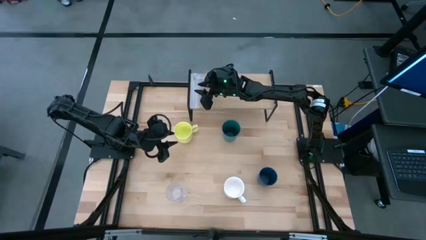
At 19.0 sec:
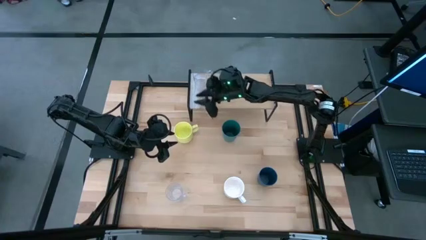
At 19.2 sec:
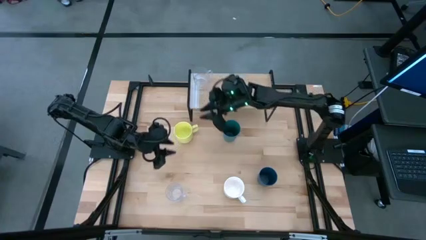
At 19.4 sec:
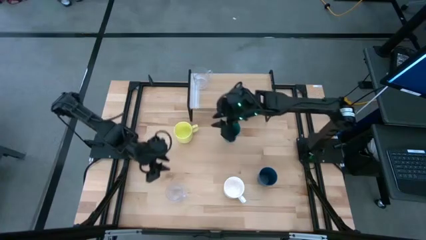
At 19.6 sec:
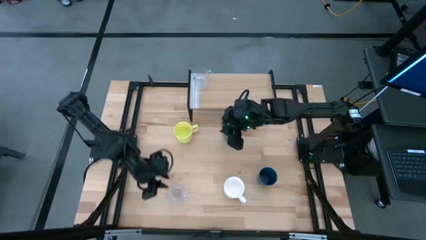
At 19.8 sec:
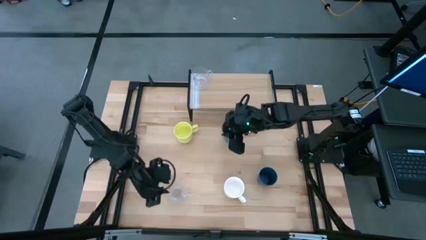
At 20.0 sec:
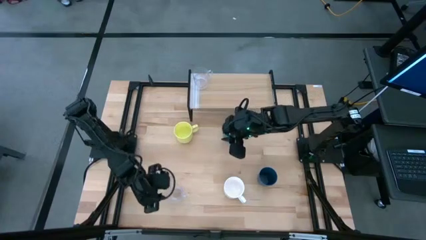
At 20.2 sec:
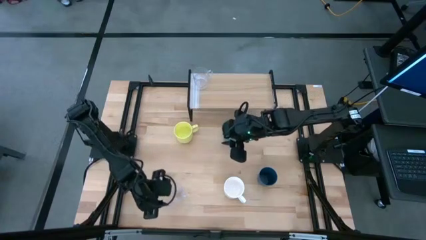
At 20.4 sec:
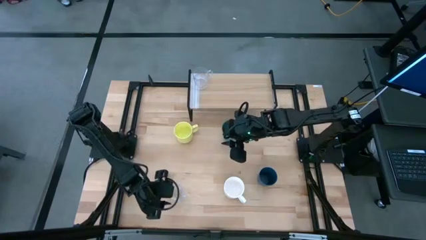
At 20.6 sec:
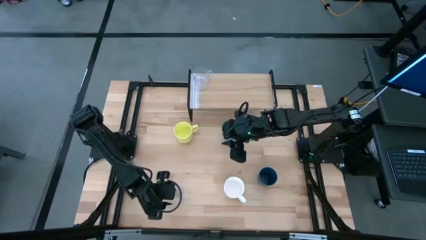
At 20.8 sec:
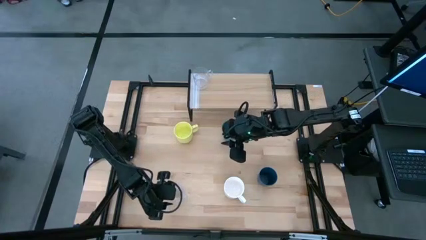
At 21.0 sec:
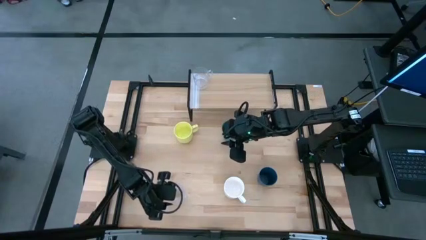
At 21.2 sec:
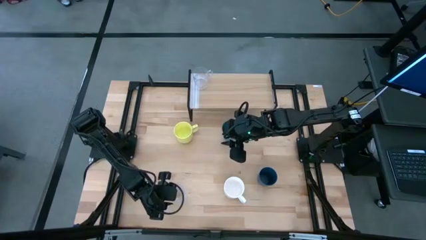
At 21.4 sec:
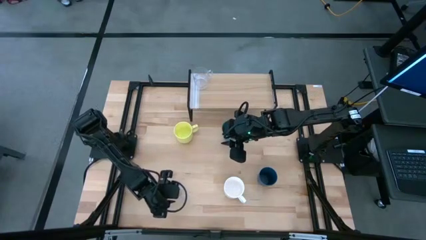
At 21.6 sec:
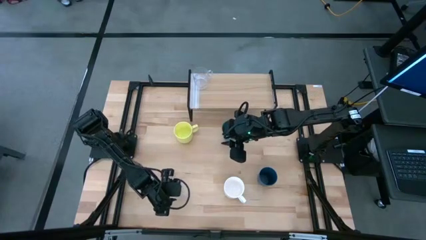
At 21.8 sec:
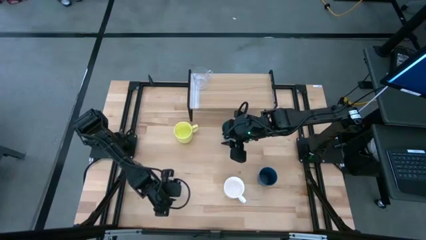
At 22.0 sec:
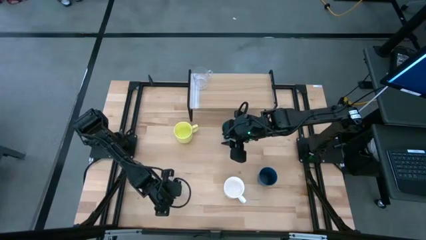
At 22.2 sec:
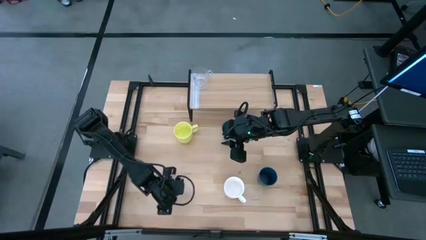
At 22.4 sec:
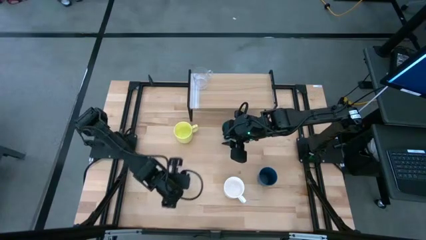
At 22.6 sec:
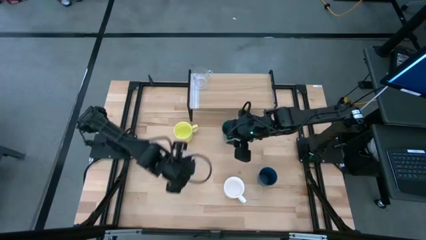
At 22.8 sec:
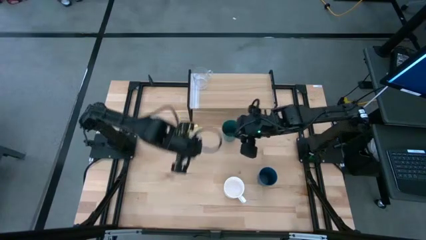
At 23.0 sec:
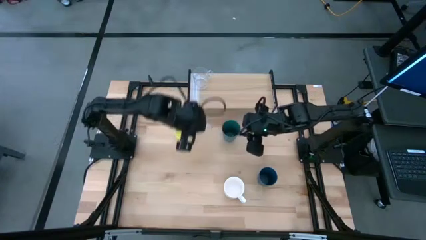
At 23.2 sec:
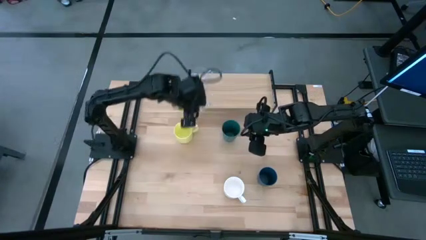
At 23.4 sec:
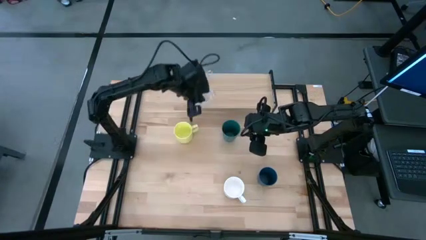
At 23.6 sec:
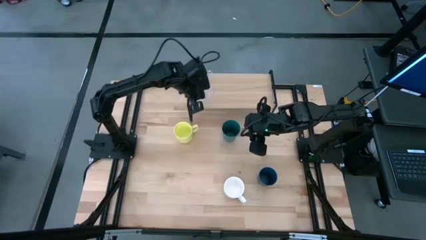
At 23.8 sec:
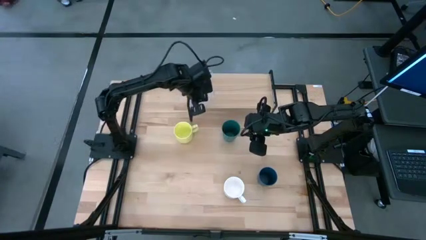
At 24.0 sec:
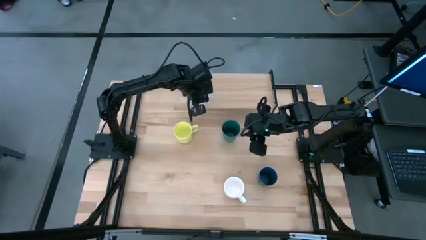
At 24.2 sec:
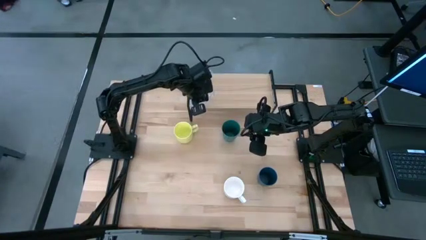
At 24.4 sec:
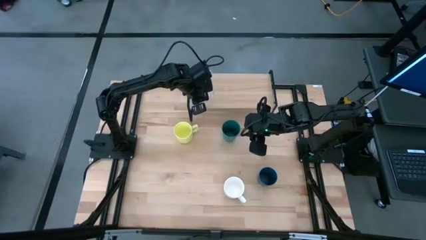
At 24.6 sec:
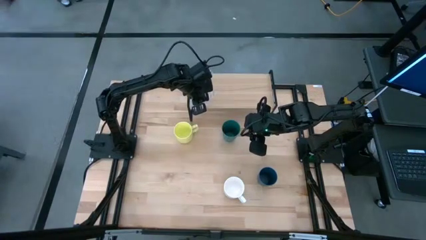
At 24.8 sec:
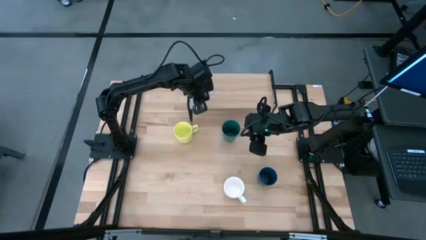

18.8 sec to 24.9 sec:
Task: Stack small to large cups/mugs on shelf
Put the transparent mug on the shelf aligned with the other transparent mug

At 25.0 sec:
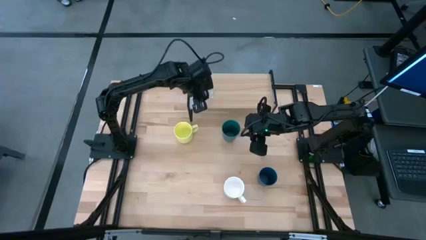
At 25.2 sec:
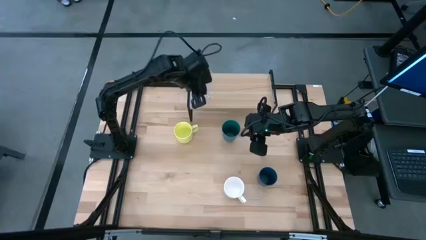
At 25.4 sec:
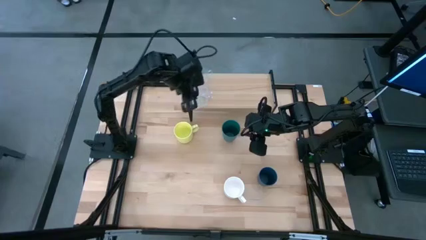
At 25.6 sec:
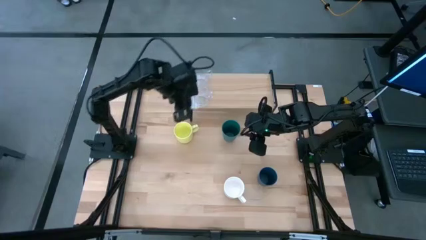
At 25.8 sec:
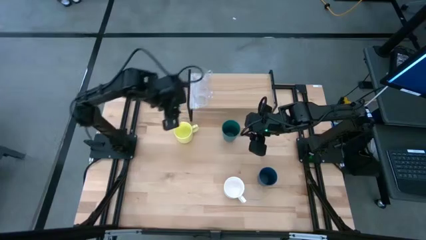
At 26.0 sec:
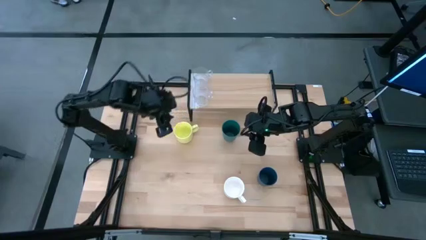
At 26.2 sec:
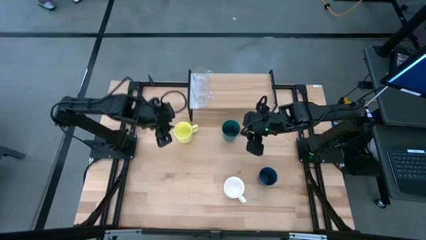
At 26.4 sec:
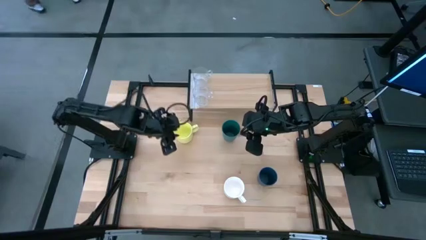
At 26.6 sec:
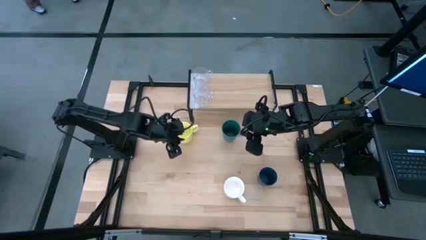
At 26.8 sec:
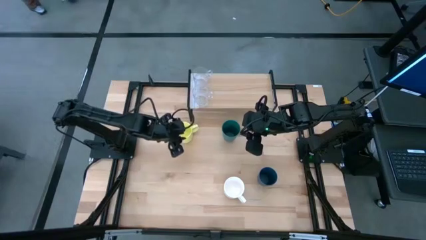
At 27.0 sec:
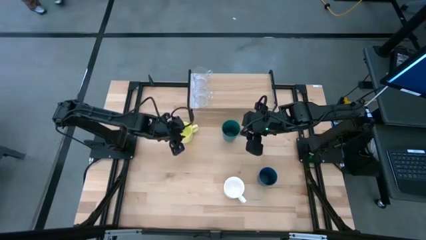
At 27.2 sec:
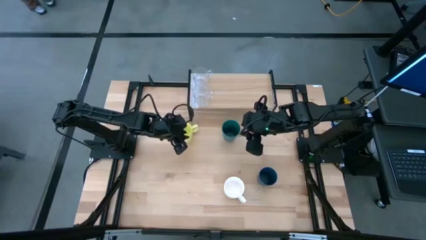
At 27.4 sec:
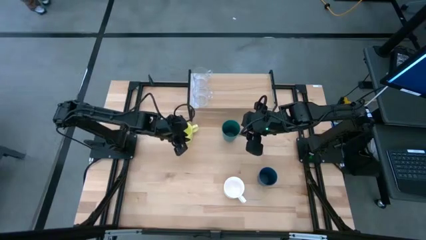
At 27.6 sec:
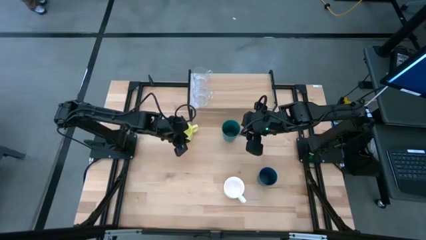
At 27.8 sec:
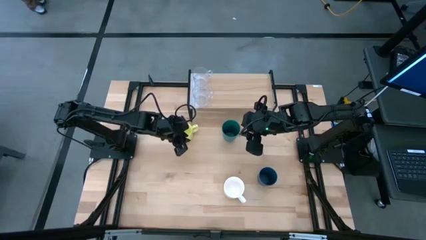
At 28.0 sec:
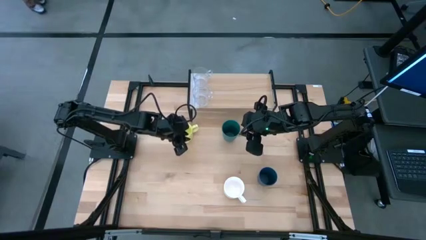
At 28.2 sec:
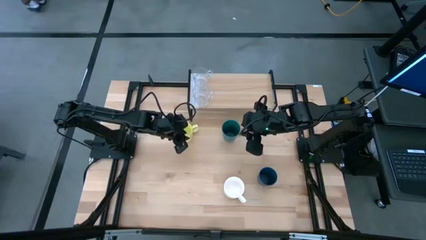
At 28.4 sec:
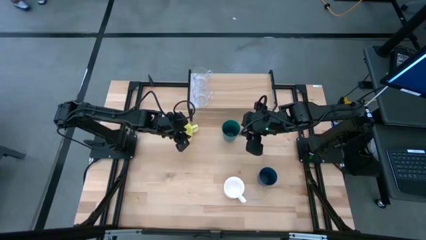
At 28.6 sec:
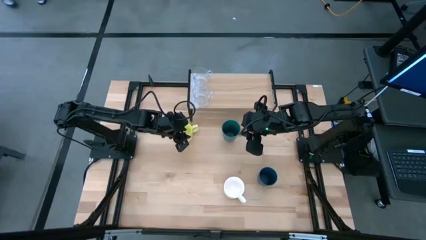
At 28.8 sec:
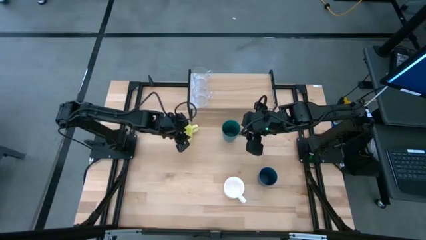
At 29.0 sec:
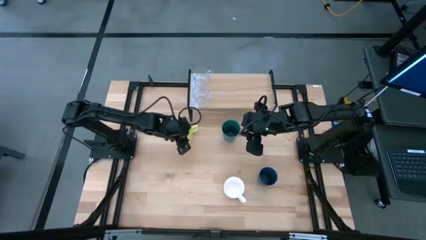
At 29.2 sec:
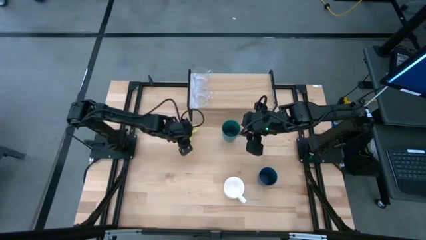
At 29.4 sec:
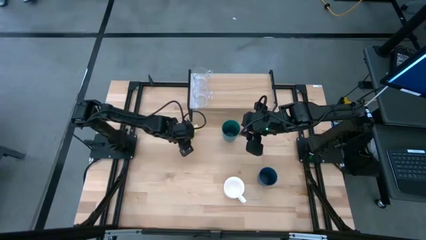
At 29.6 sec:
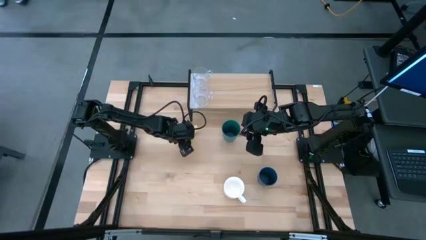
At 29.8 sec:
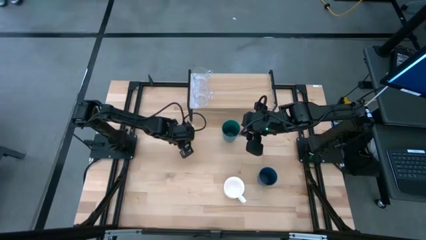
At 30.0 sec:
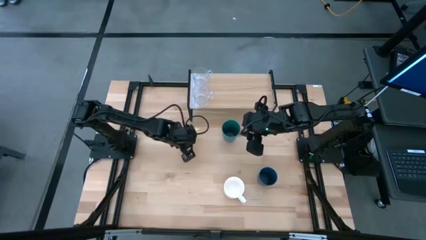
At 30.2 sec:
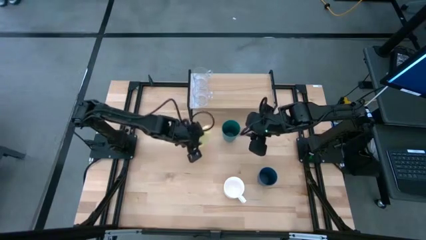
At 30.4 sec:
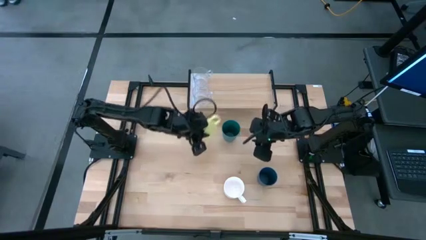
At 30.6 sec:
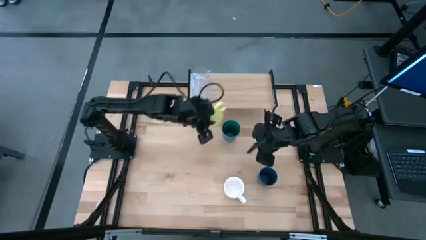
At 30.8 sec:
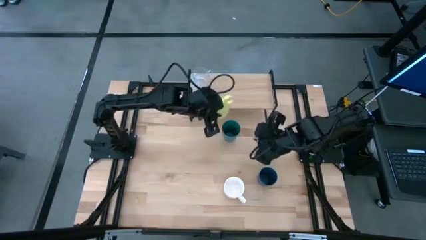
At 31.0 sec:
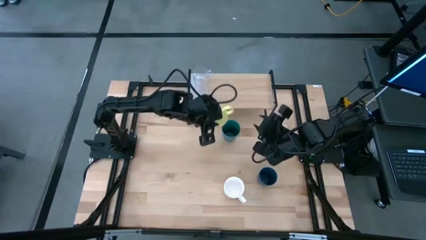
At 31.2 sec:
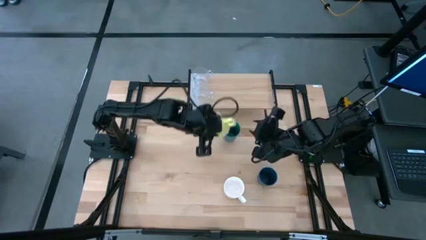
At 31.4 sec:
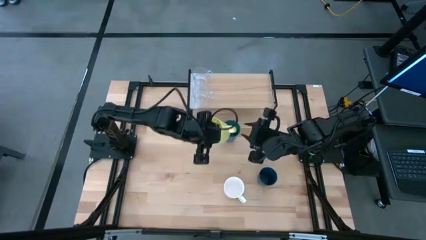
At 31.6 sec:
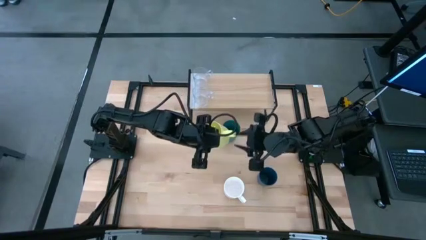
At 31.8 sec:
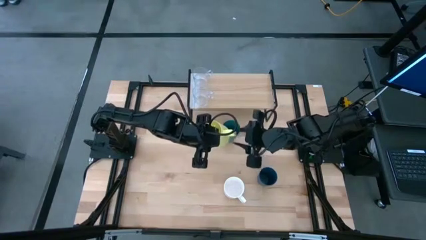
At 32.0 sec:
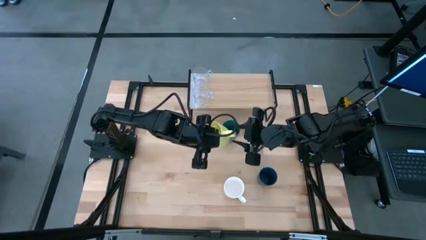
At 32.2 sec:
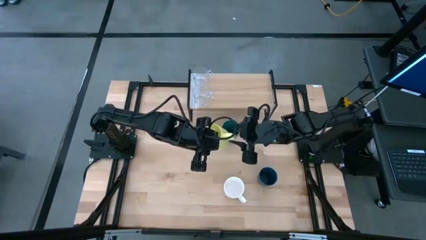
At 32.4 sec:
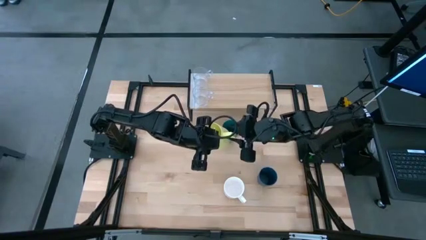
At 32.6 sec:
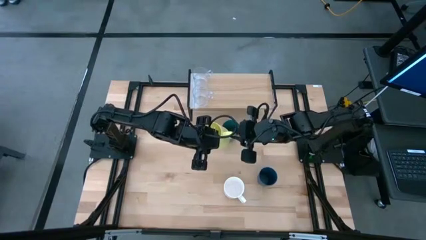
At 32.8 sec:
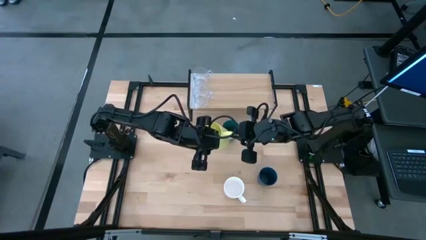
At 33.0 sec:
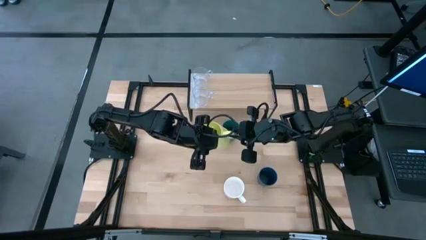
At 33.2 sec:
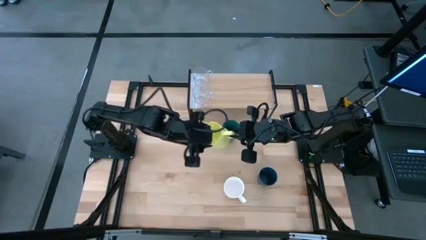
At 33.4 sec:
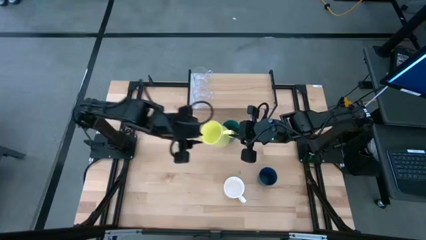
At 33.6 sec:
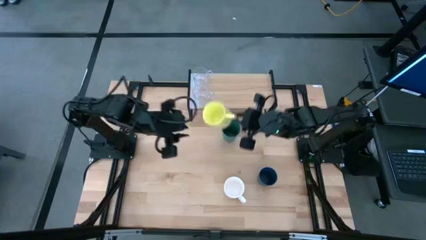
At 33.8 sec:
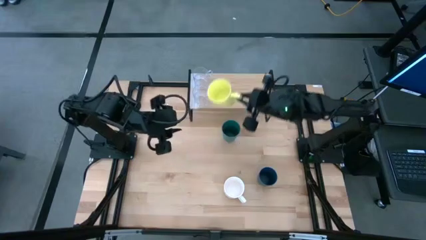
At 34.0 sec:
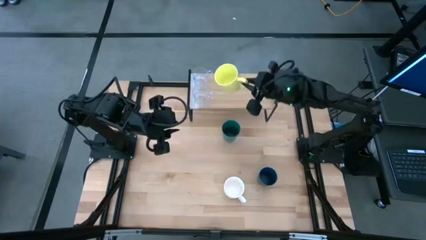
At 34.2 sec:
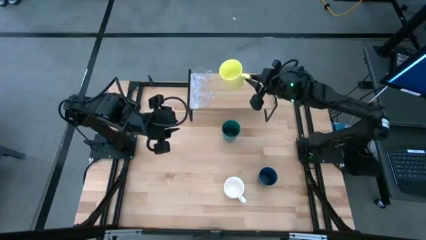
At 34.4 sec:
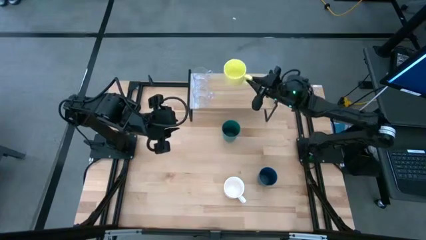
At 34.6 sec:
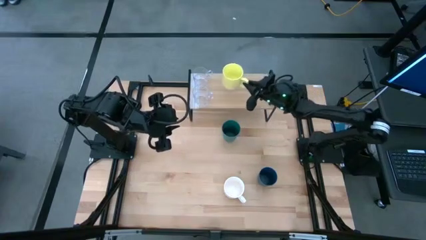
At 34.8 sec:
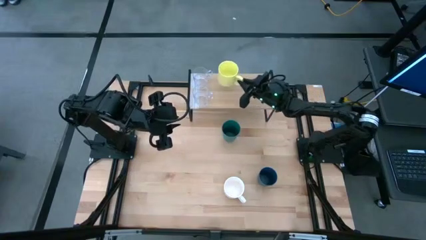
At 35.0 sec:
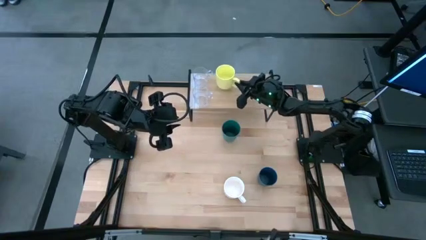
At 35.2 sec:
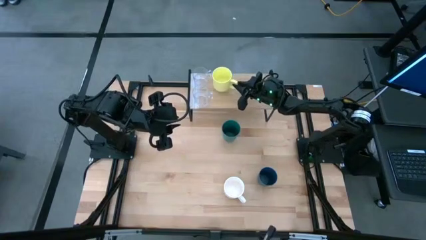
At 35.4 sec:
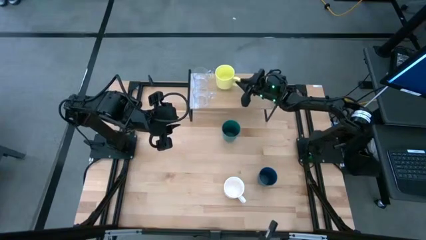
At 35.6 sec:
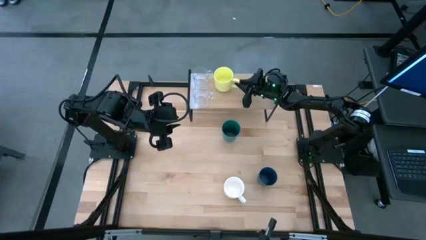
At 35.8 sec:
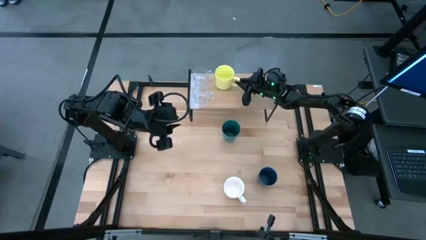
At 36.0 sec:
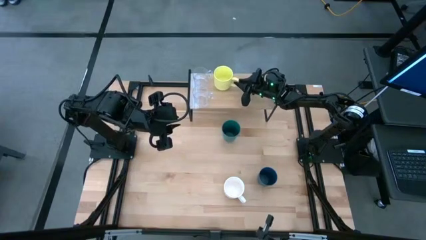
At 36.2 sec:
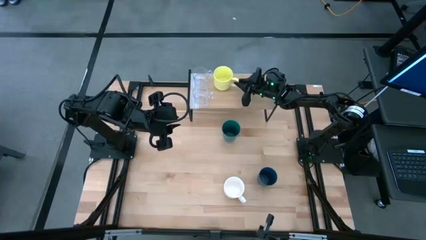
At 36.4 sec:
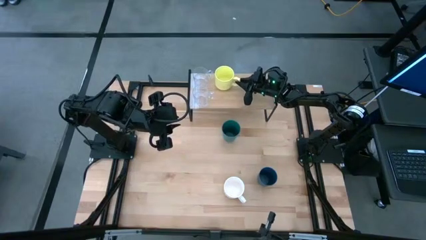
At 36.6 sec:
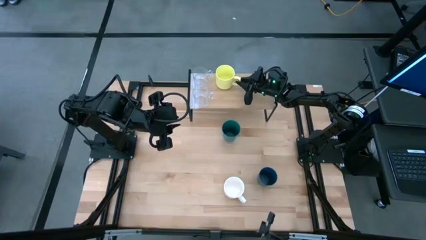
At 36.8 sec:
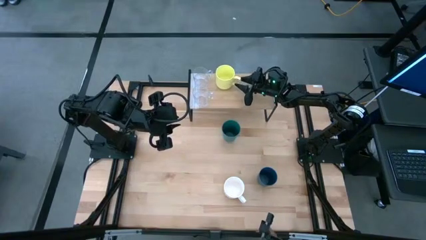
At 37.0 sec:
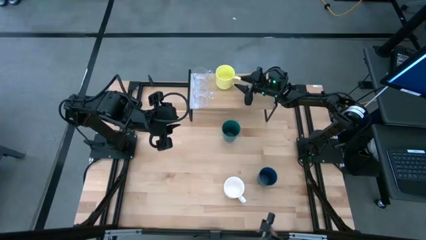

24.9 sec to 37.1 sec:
Put the yellow mug on the shelf
